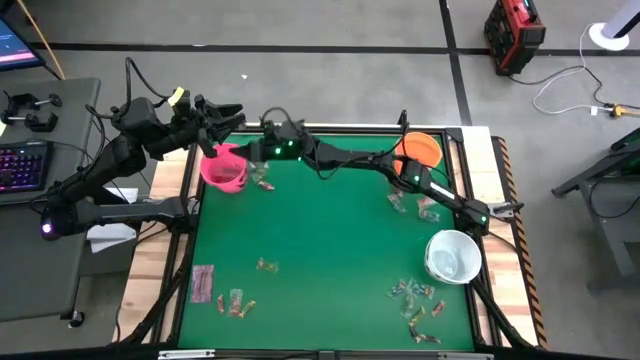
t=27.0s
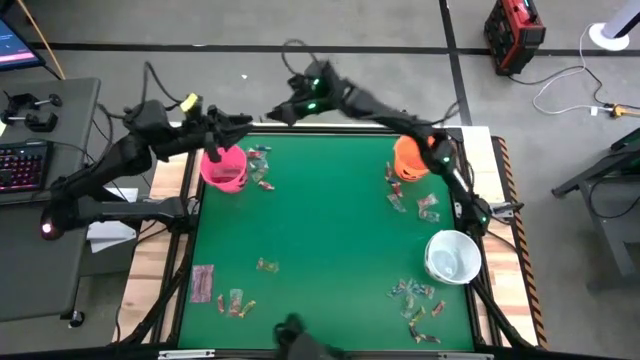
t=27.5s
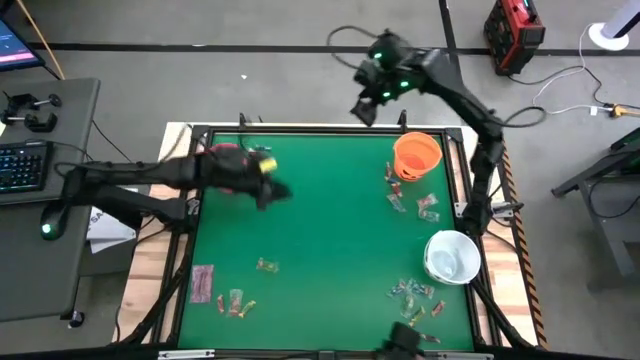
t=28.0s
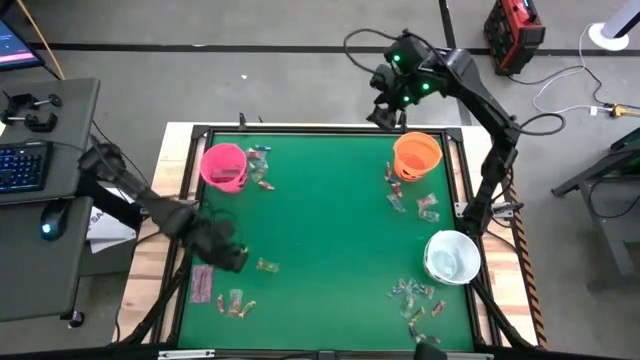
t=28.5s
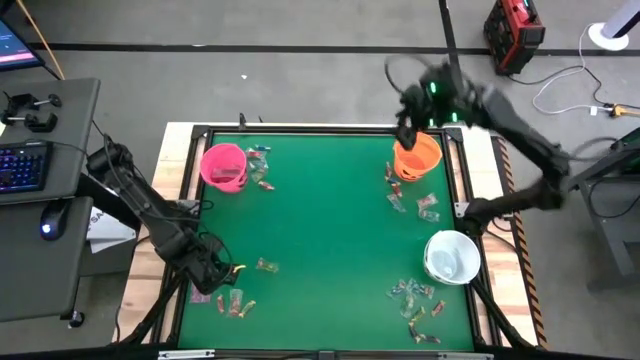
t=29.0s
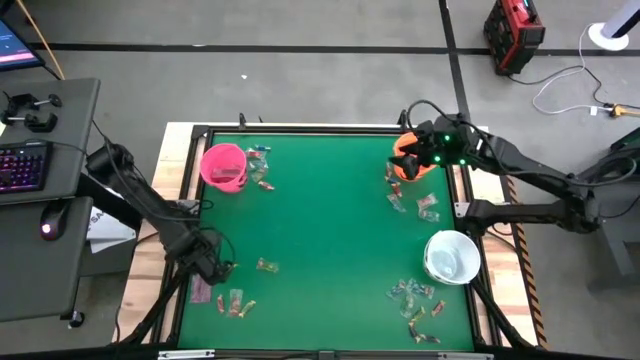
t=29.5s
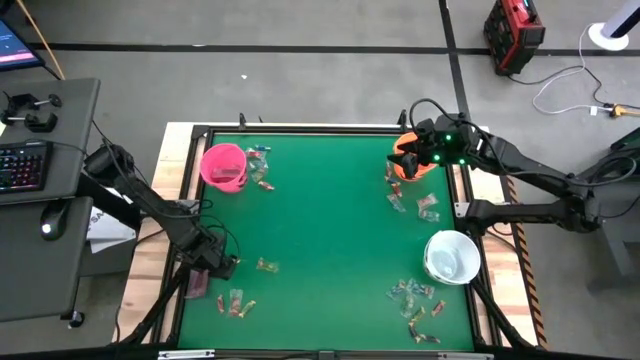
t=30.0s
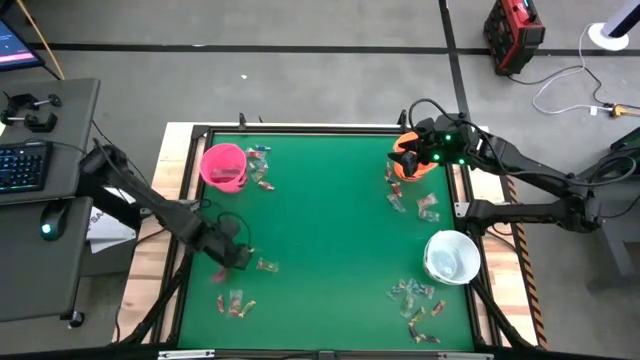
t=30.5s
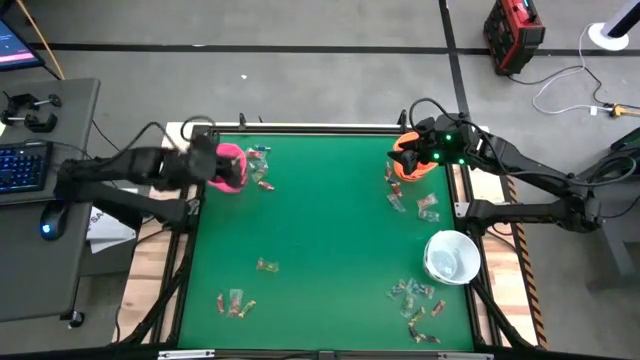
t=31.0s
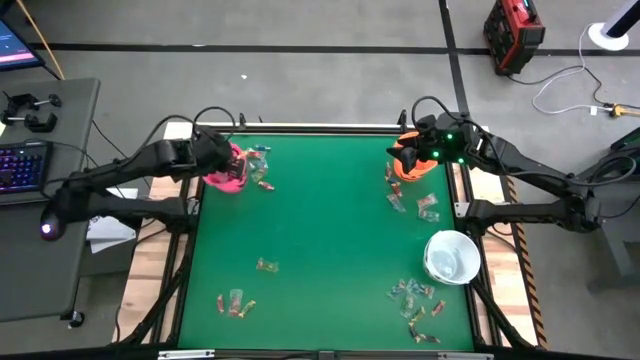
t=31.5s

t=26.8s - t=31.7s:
Task: Sort candy by brand, put in halloween buckets
Put the red candy into the pink bucket

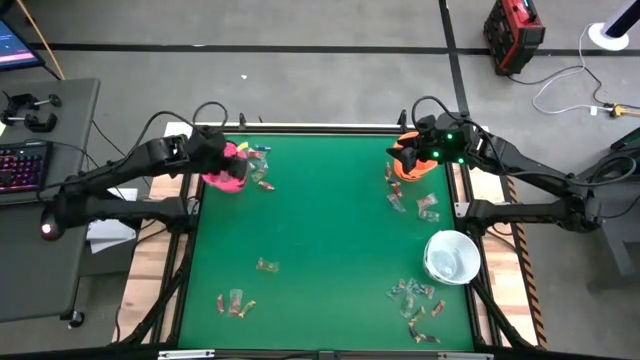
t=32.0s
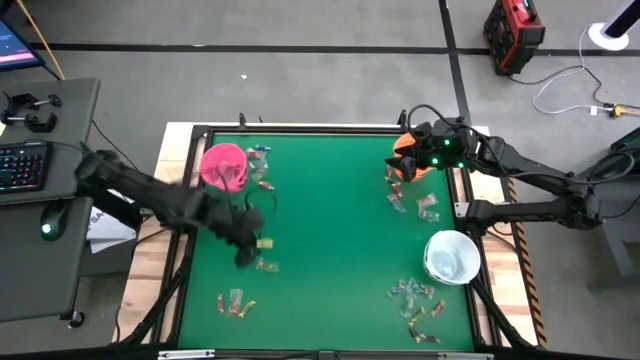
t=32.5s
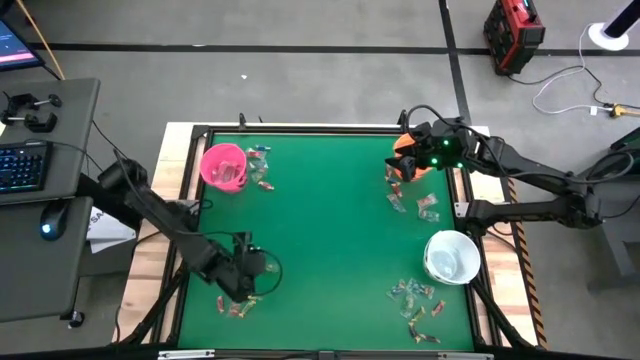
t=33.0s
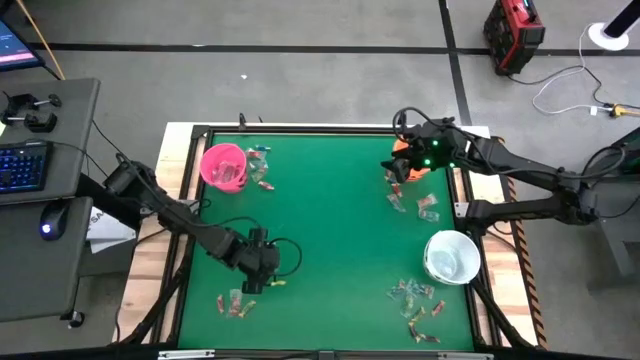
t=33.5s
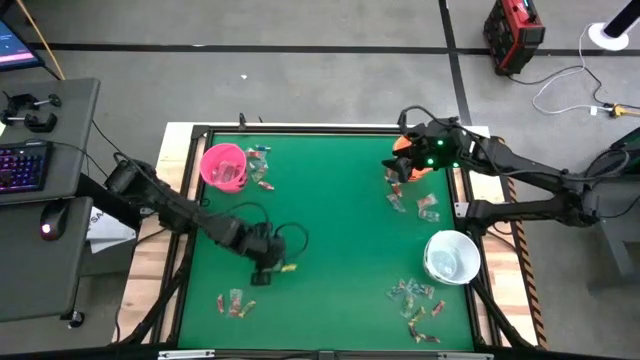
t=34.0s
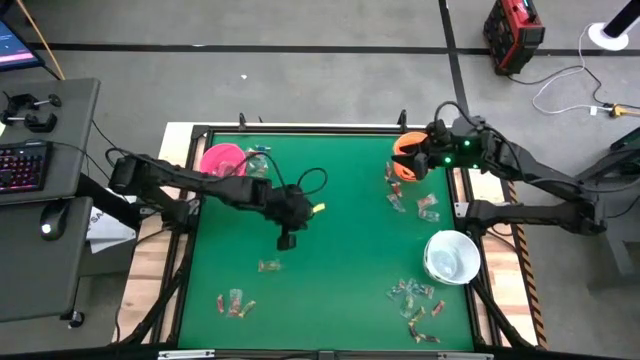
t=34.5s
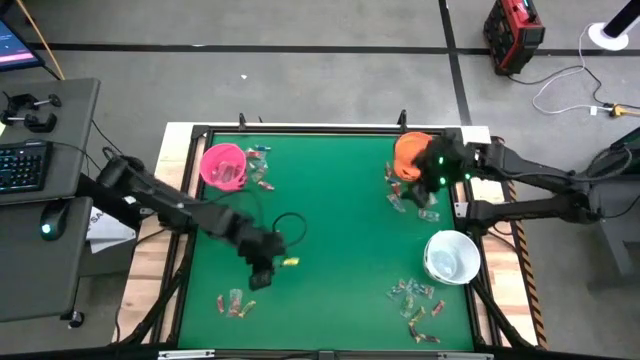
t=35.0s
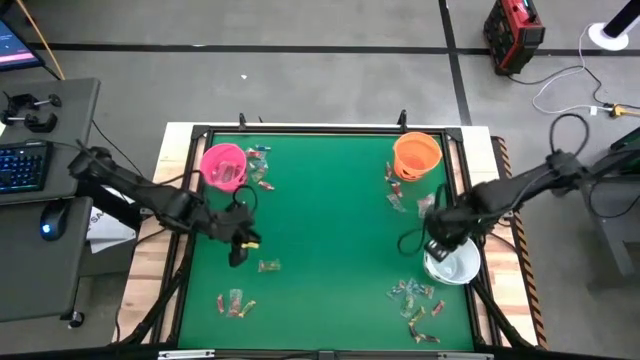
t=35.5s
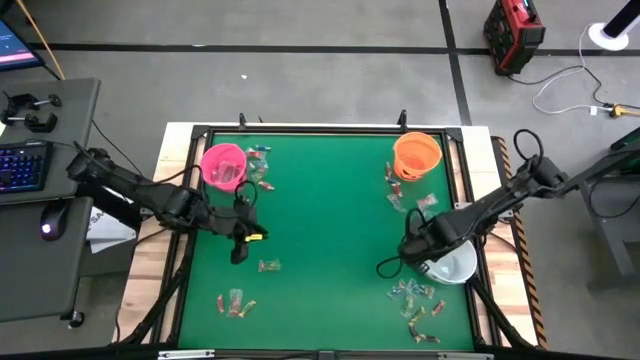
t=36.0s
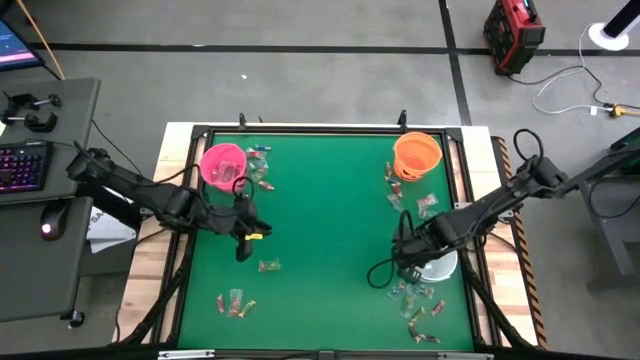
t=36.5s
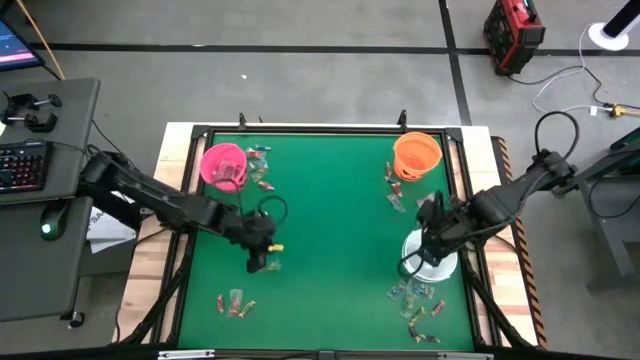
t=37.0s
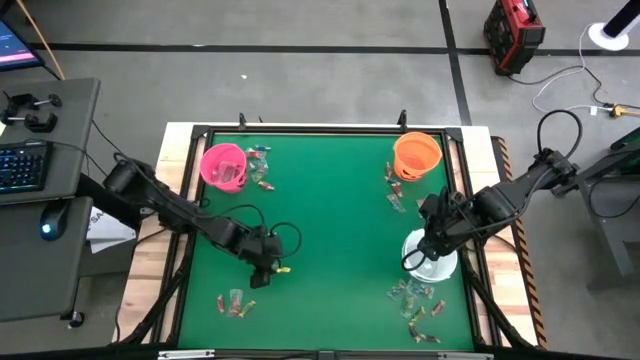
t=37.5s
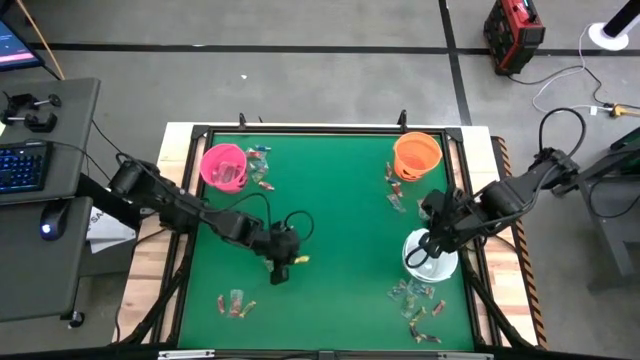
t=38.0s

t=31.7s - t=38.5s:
Put the green gummy into the white bucket

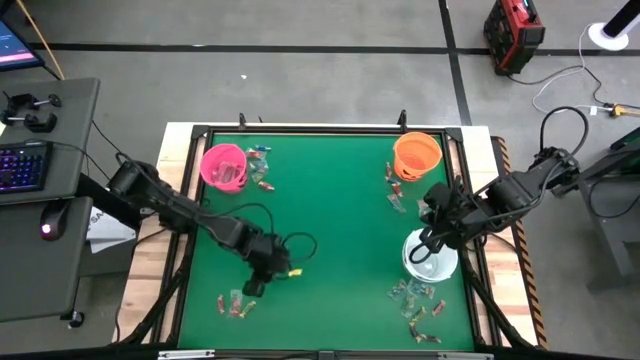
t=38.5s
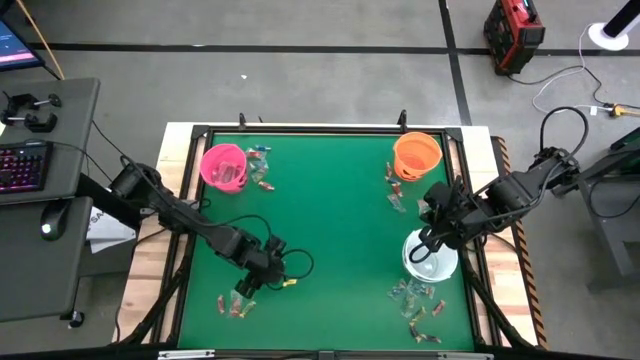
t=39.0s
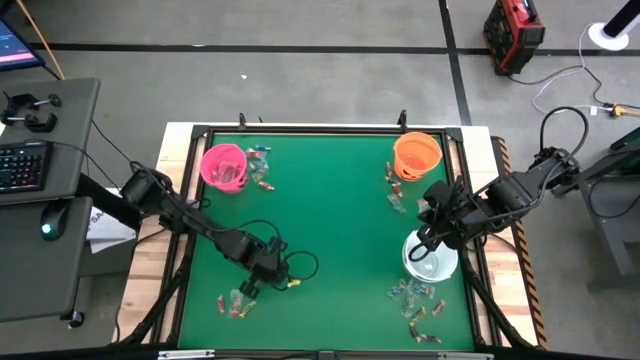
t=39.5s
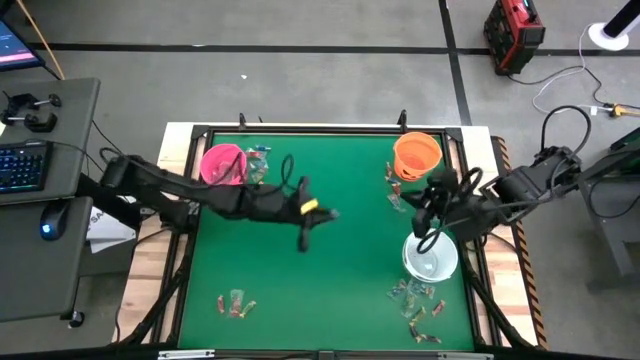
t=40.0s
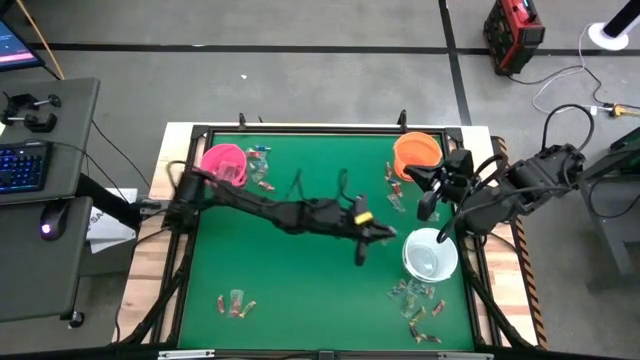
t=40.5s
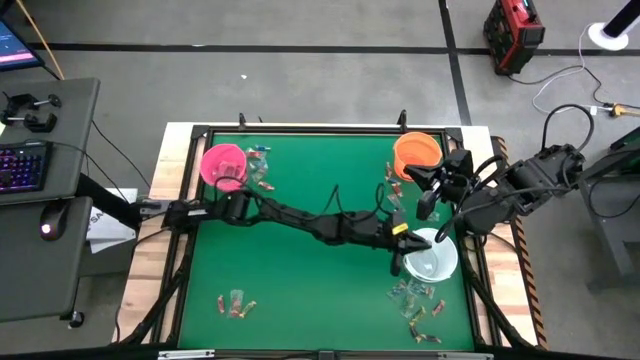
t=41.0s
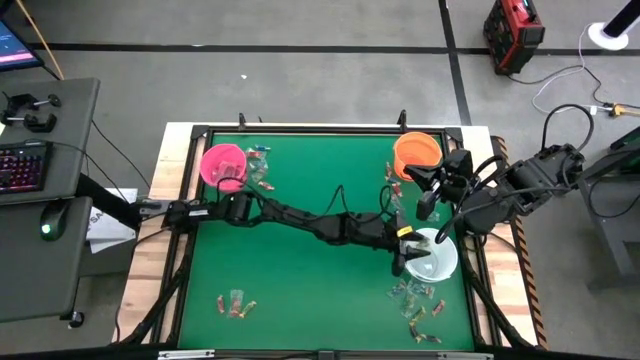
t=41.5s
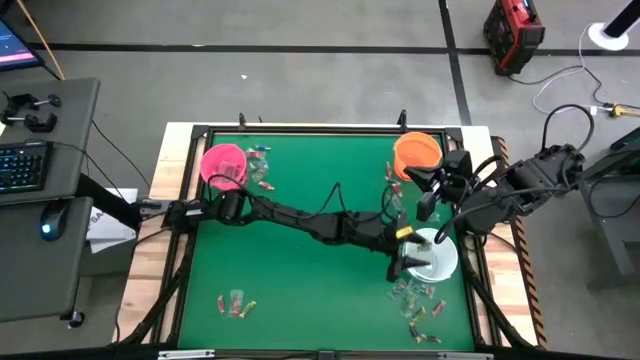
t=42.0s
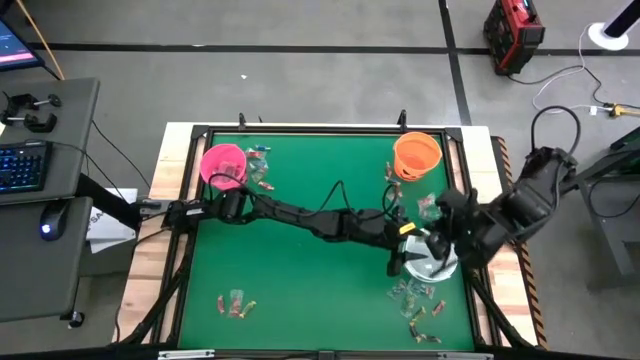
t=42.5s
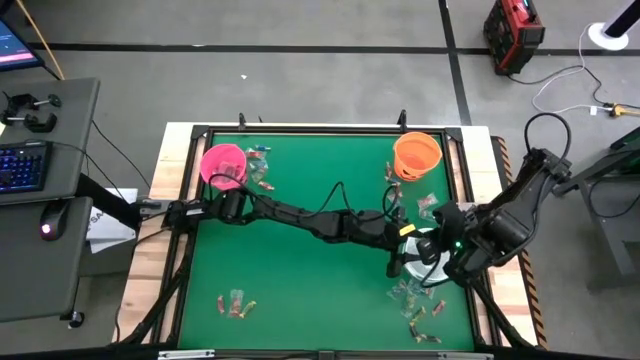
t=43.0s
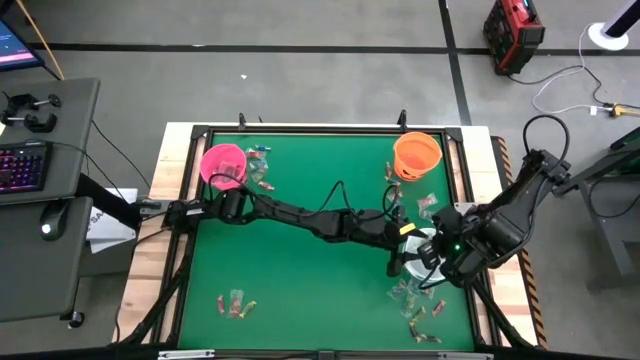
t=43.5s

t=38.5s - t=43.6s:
Put the orange gummy into the white bucket

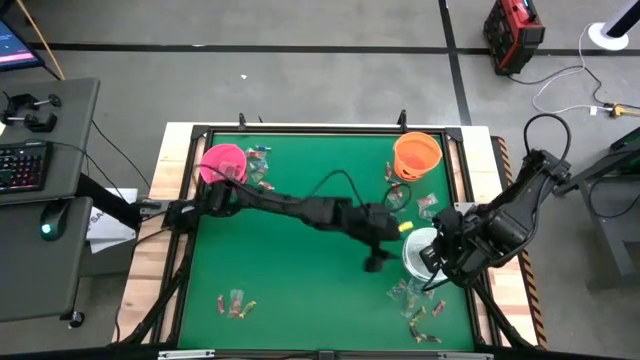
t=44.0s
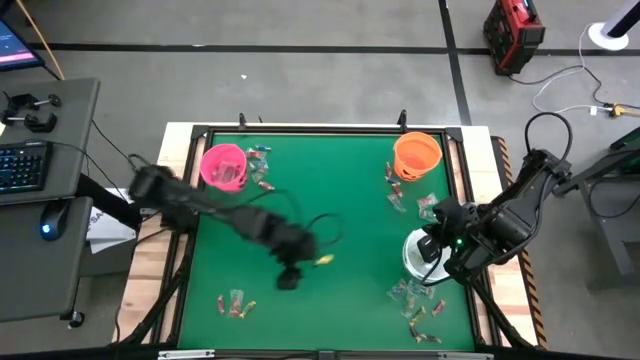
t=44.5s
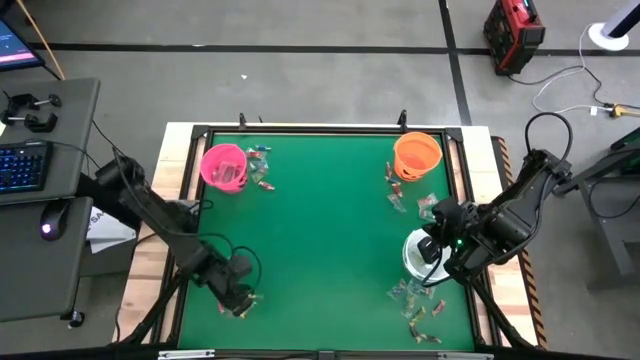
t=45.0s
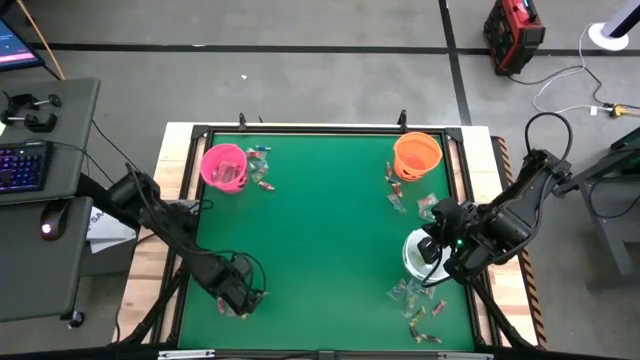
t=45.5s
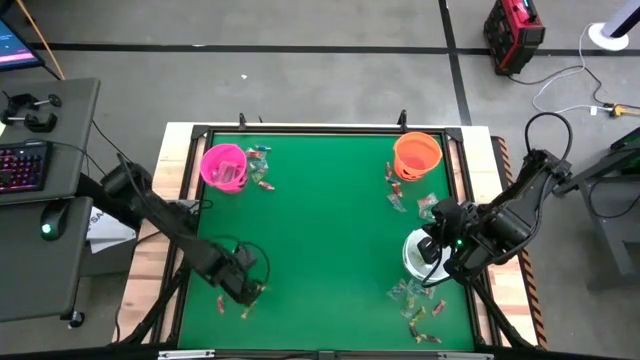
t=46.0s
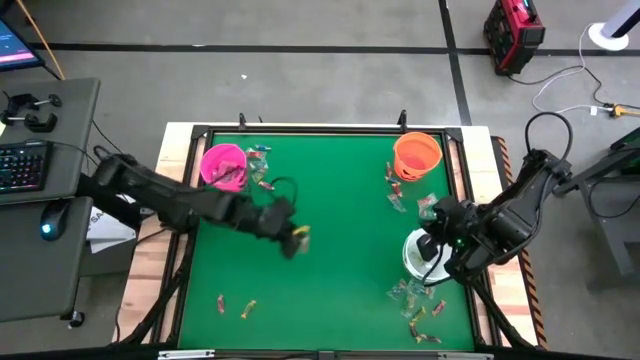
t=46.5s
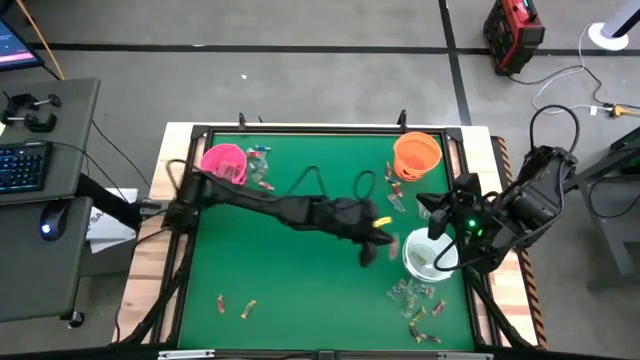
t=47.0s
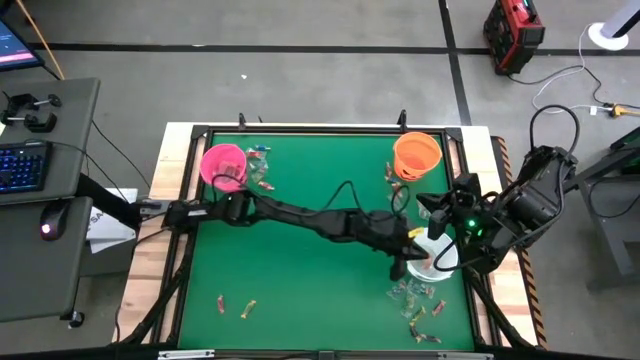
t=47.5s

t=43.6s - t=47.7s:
Put the orange gummy into the white bucket

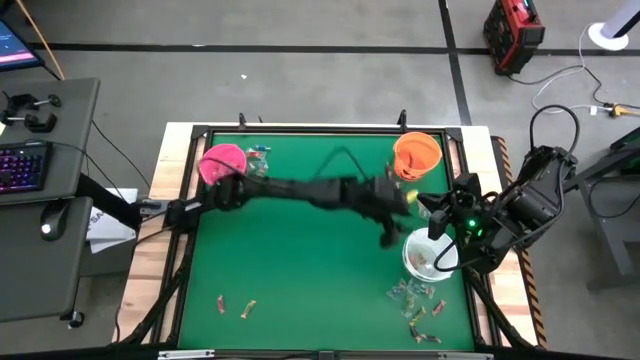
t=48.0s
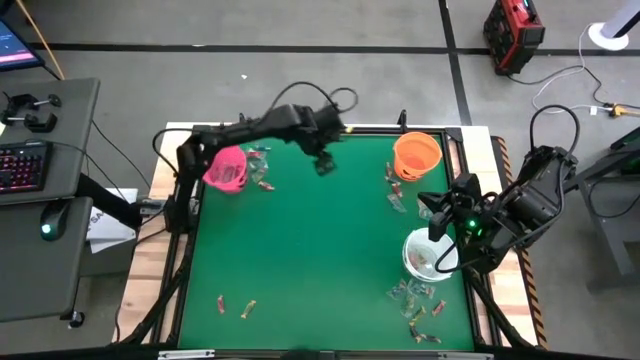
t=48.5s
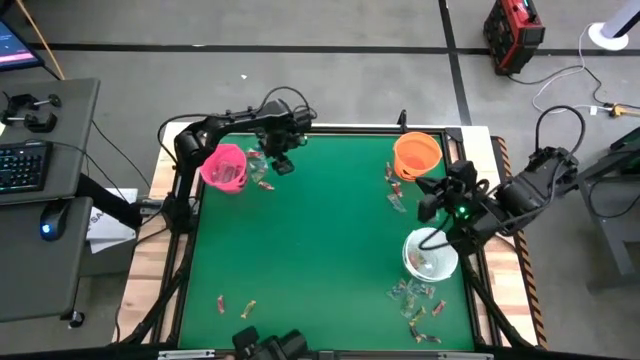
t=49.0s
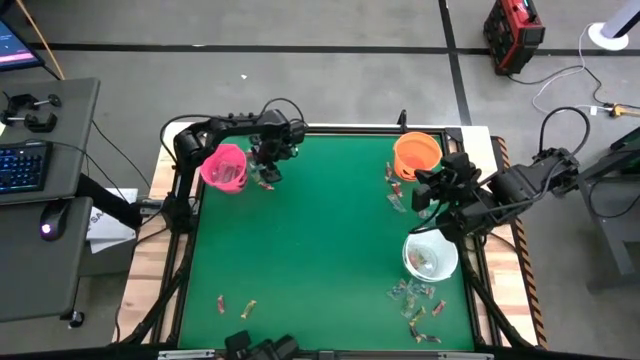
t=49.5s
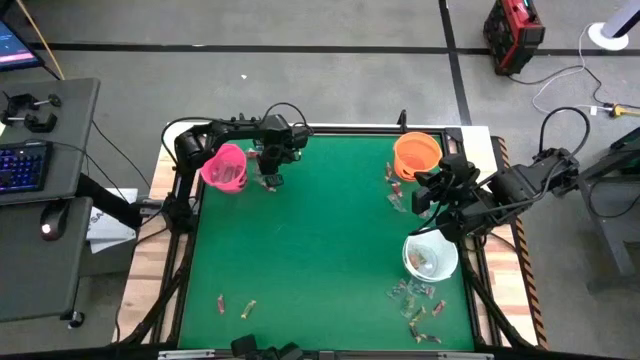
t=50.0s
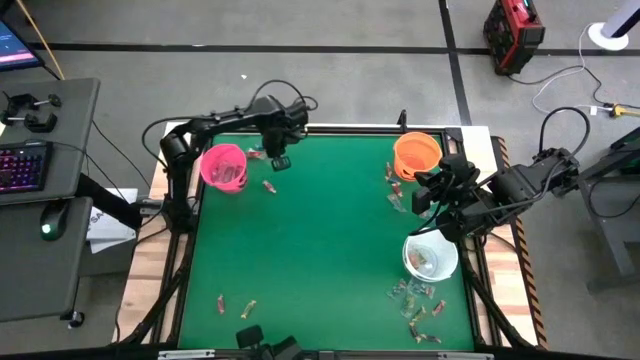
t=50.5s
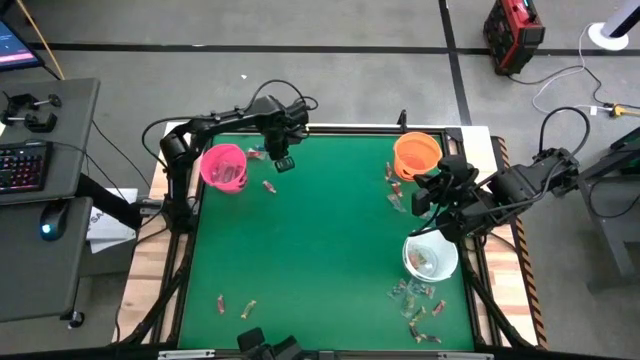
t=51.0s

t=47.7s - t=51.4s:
Put the green gummy into the white bucket
